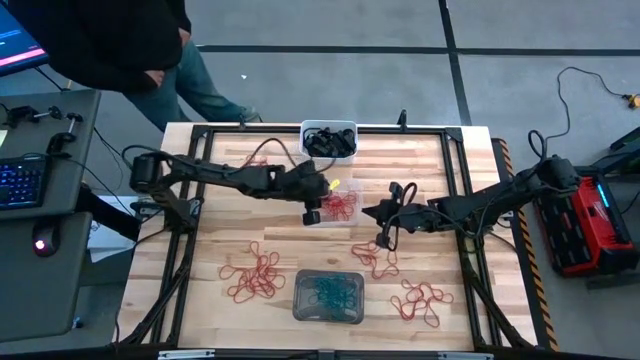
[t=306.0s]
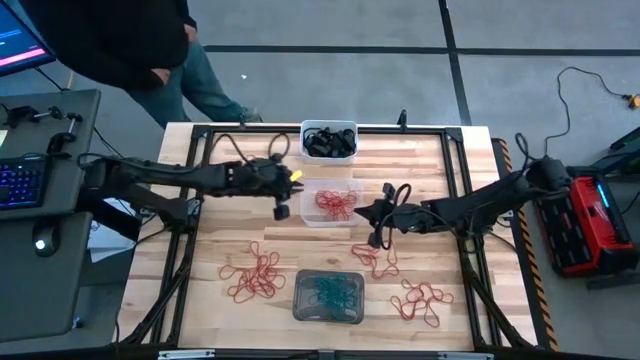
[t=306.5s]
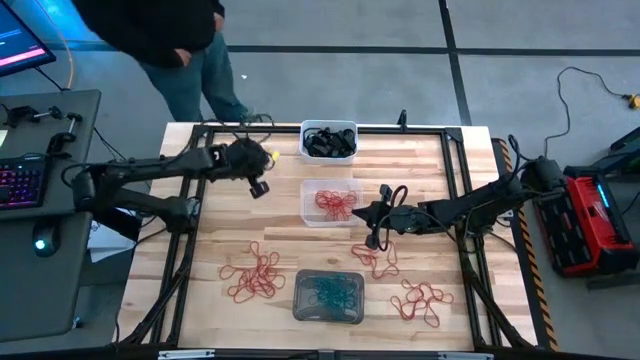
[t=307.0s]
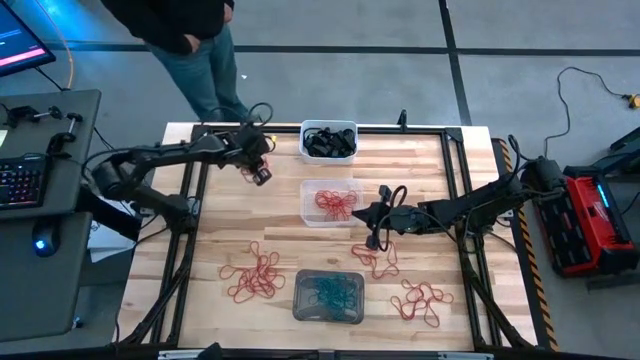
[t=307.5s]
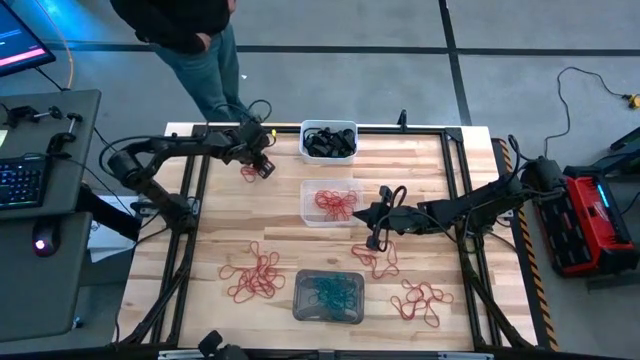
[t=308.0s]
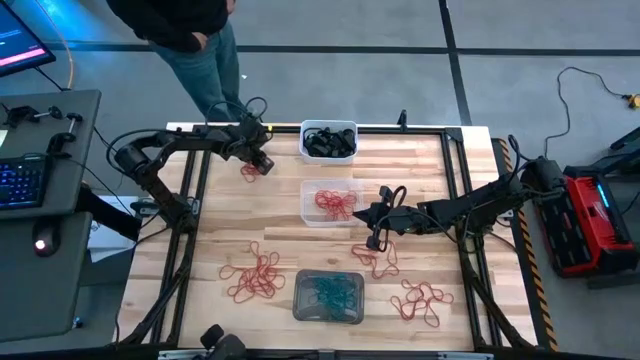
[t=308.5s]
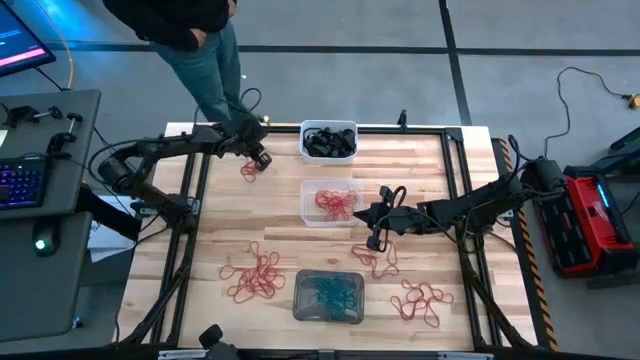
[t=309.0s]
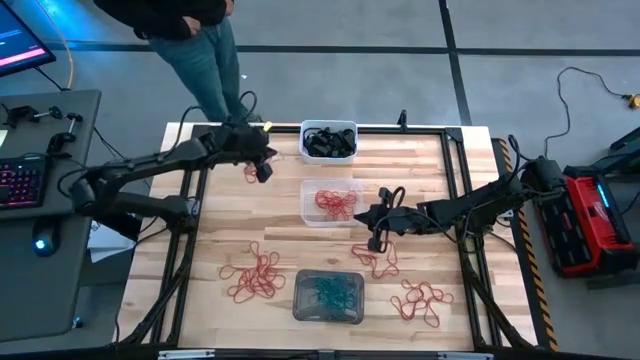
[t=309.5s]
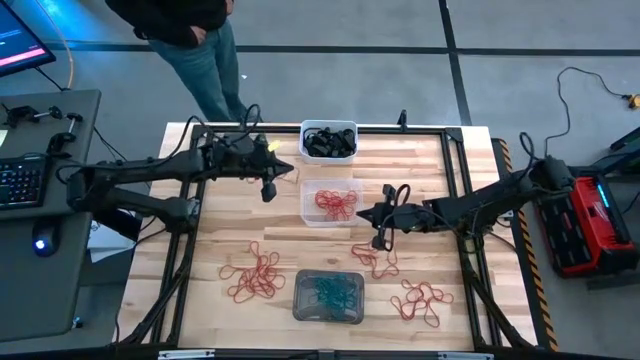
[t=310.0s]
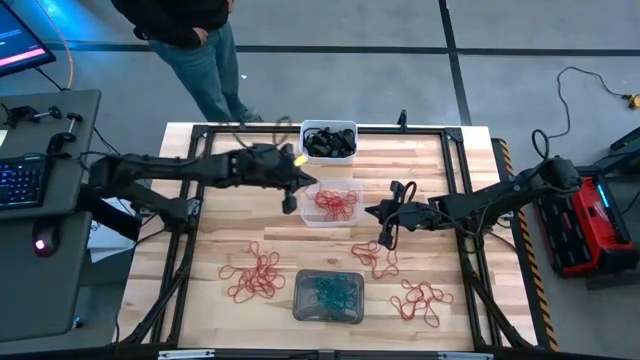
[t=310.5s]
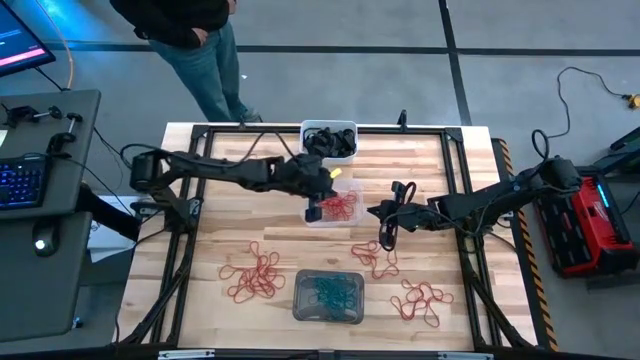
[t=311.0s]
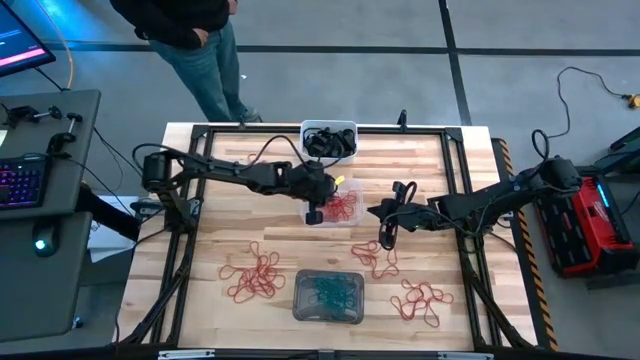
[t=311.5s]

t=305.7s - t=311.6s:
Task: Sort rubber bands into baskets
Put the red rubber band into the transparent bin

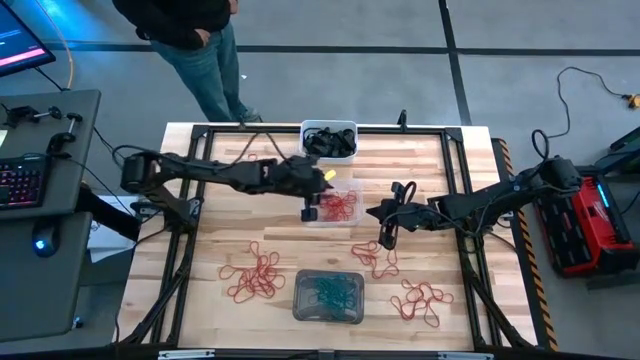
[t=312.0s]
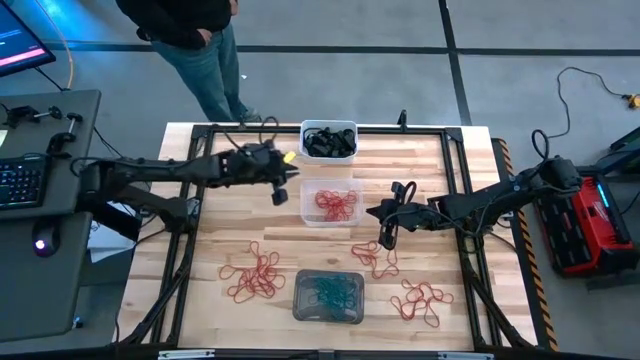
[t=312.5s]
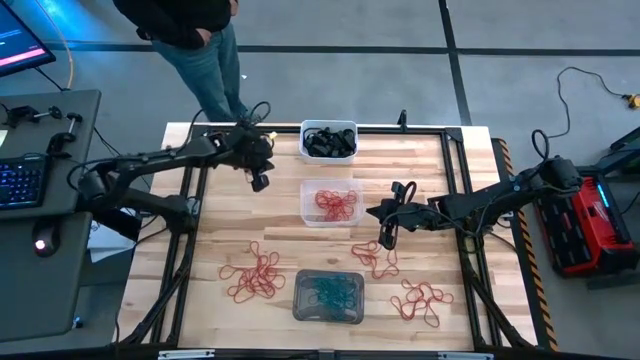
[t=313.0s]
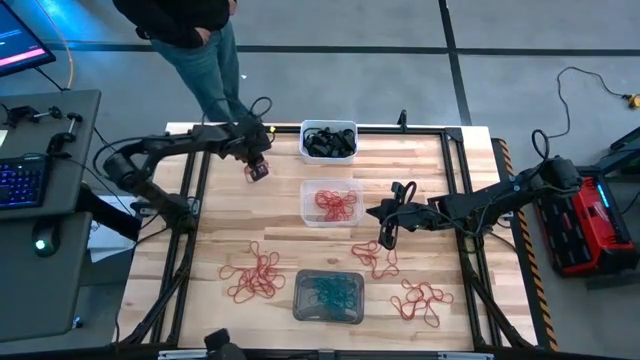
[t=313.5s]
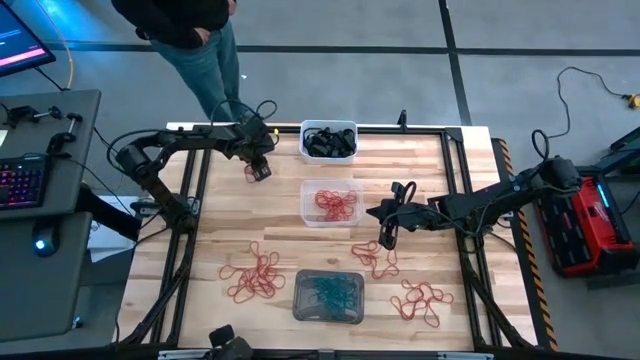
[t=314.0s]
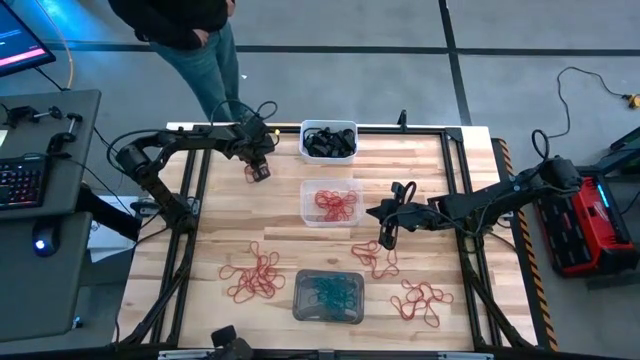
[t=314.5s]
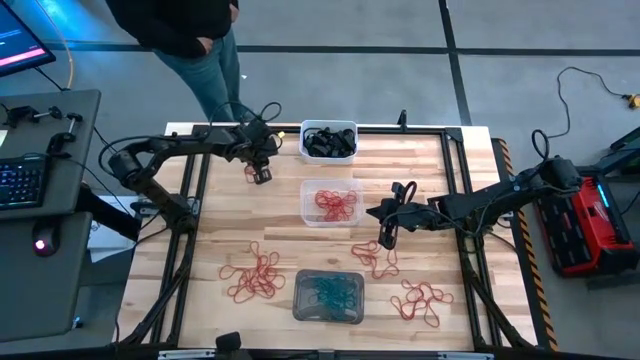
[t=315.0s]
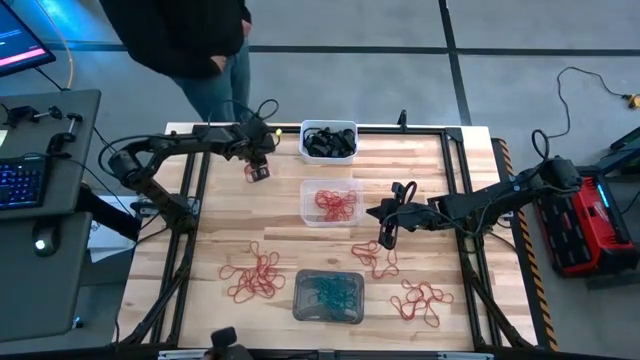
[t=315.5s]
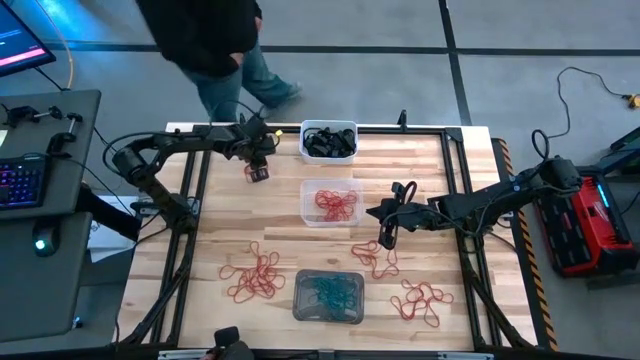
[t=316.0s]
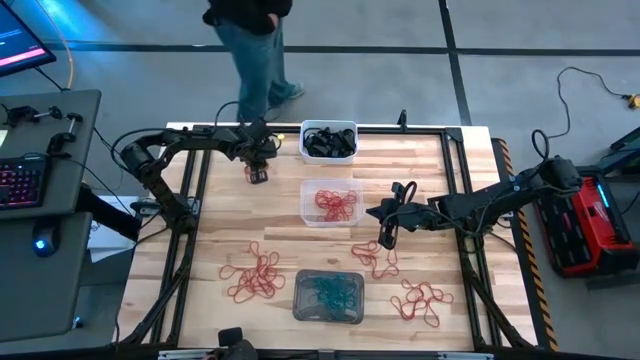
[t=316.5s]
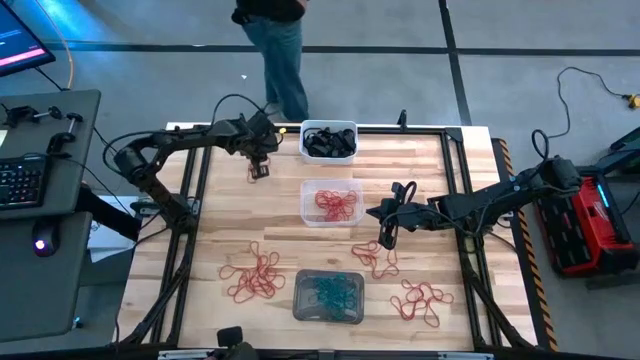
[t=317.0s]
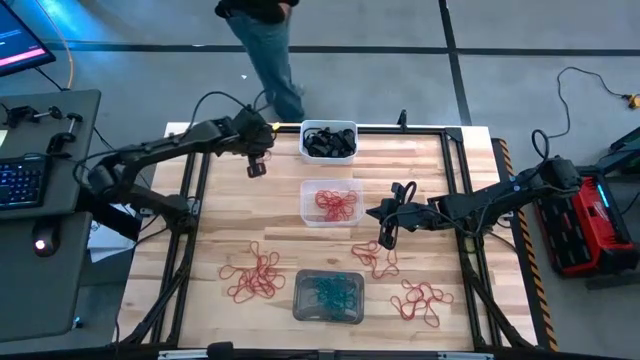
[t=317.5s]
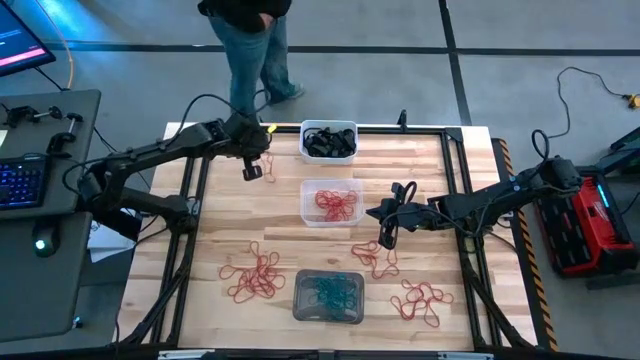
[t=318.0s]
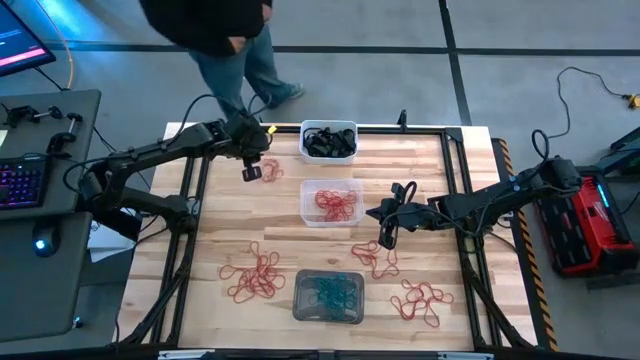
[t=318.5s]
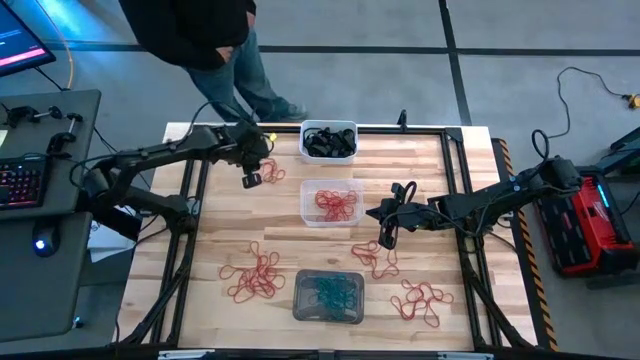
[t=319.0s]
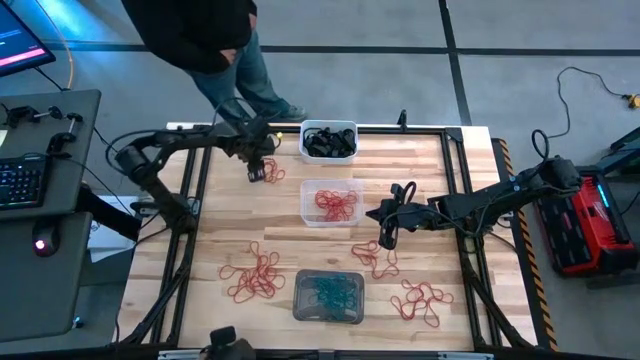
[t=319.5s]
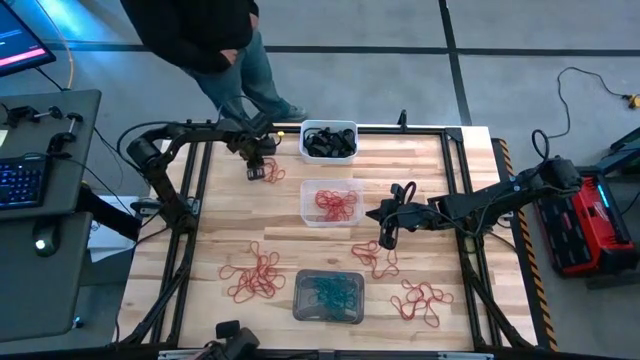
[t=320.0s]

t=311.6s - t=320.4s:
Put the red rubber band into the transparent bin

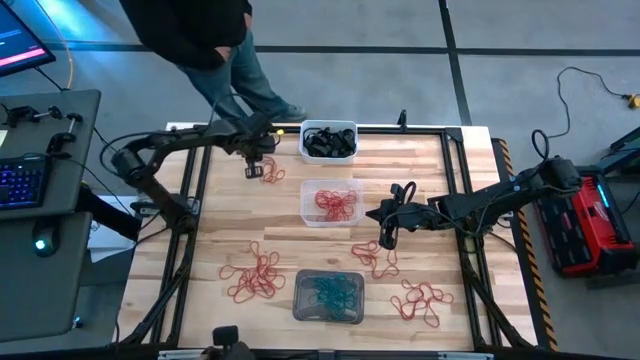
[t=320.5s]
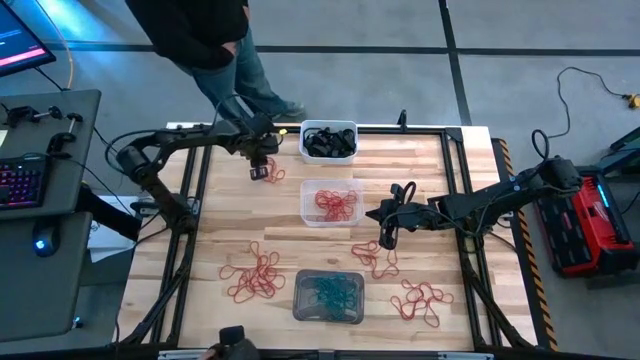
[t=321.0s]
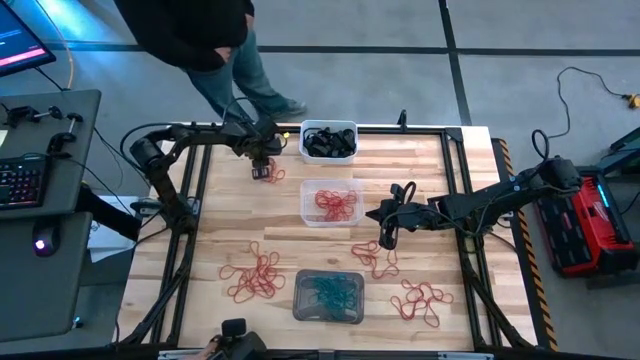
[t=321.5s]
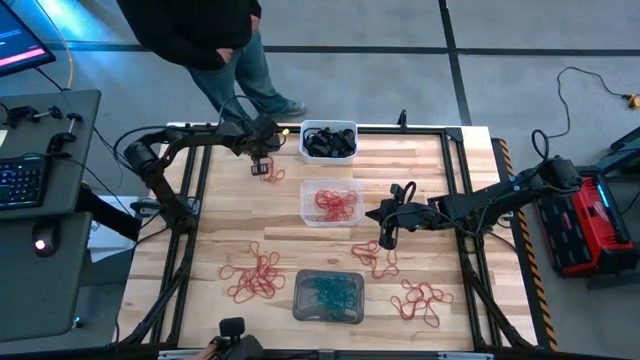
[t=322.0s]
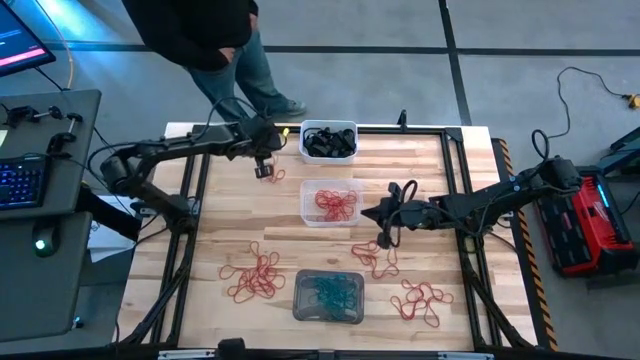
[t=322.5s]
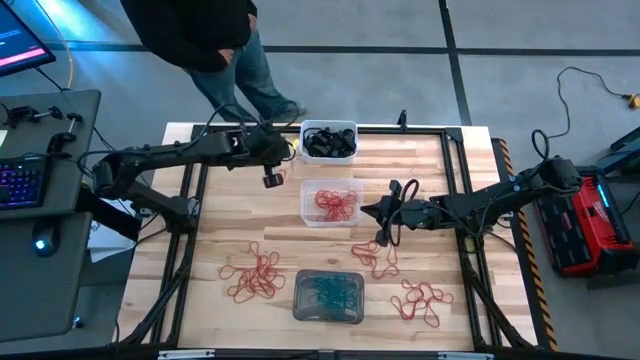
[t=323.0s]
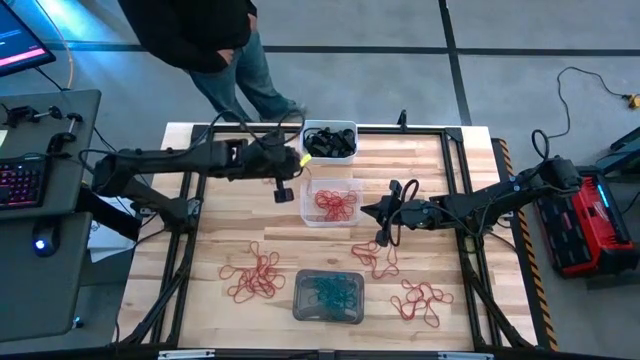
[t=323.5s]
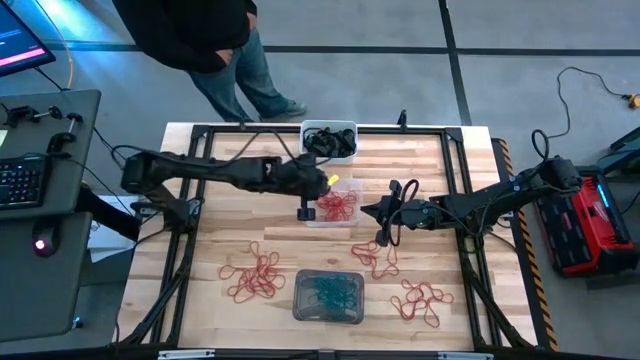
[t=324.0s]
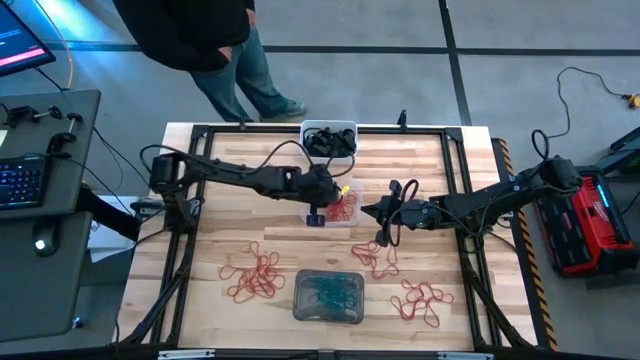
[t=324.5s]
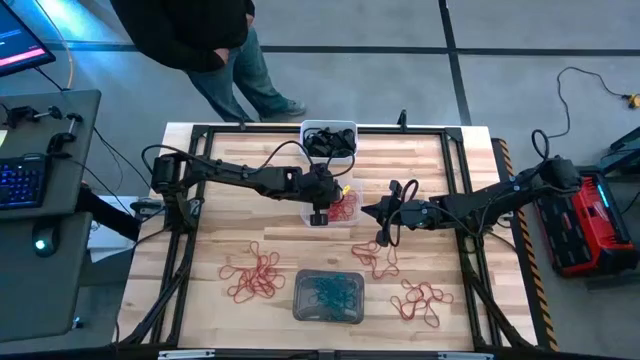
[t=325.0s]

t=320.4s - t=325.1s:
Put the red rubber band into the transparent bin
